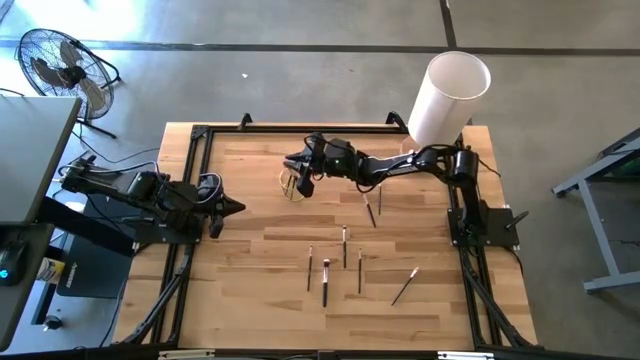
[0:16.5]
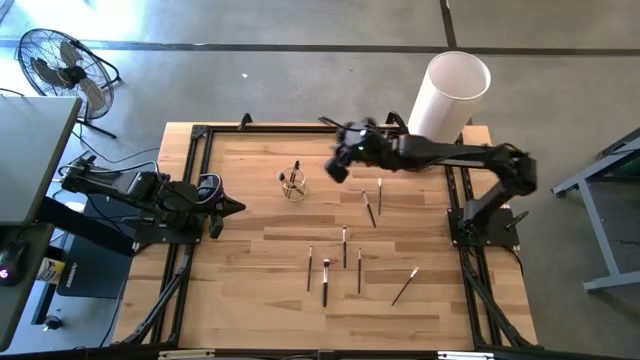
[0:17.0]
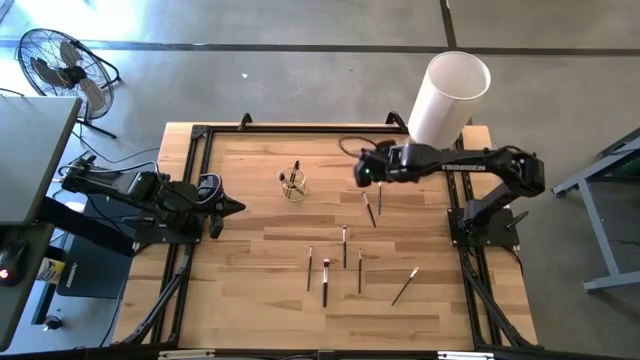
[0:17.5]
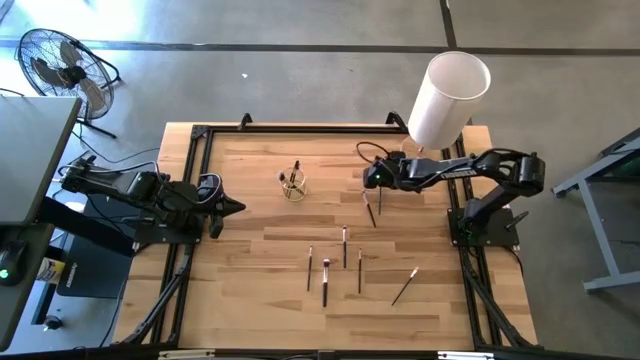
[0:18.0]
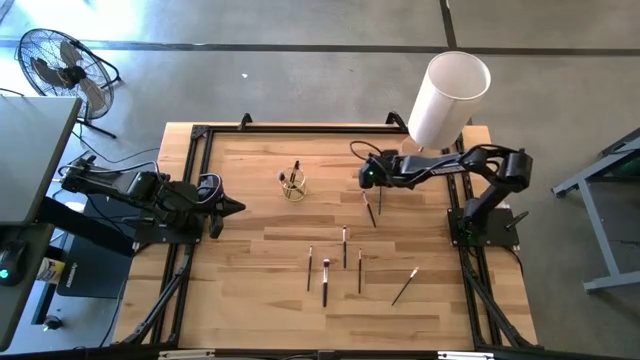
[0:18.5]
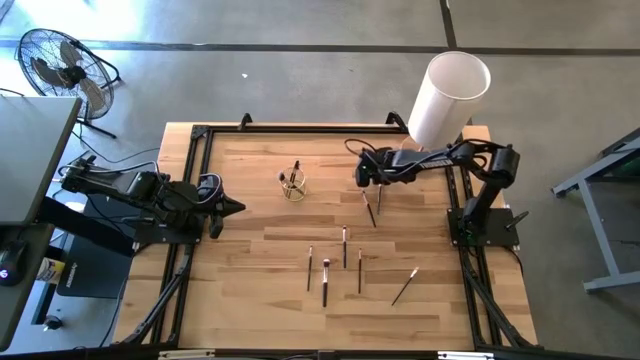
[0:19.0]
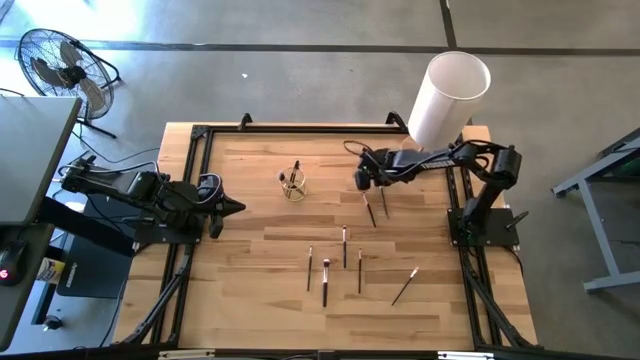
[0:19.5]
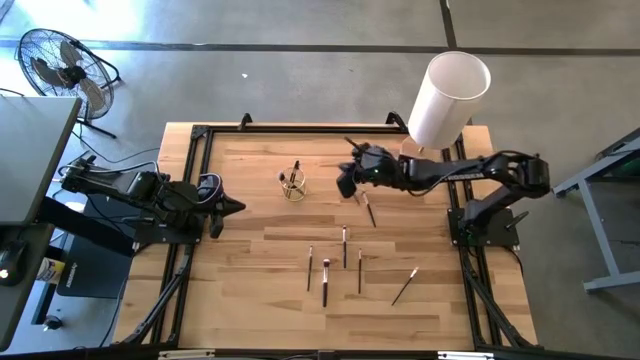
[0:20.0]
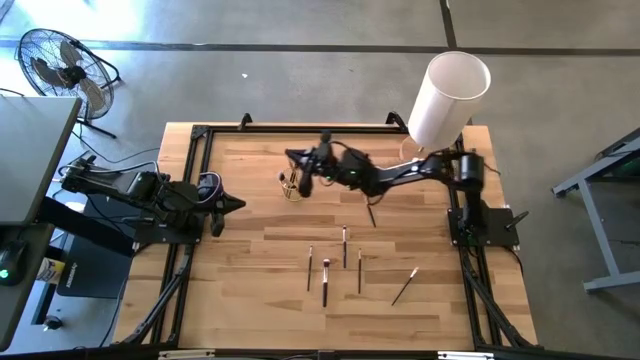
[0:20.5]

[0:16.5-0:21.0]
Task: Put items in baskets/containers
Put the makeup brush into the wire organizer

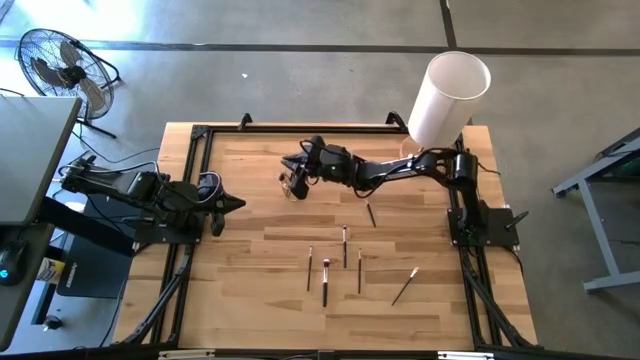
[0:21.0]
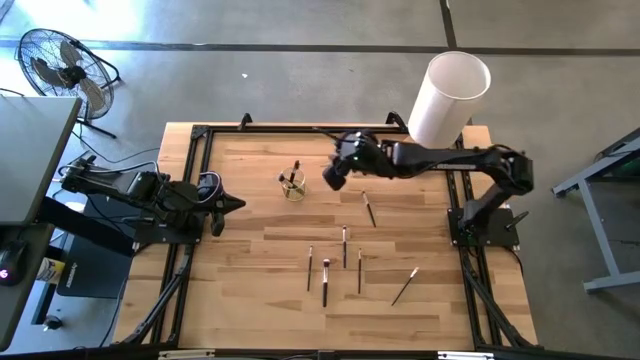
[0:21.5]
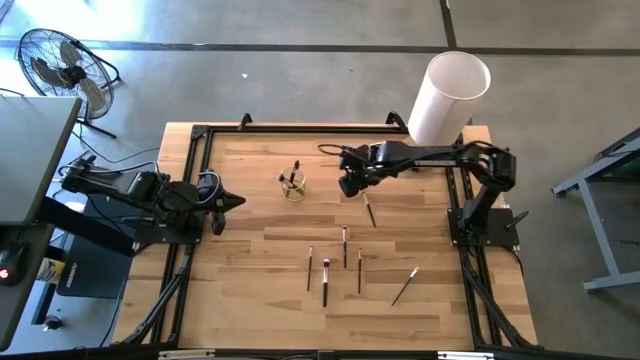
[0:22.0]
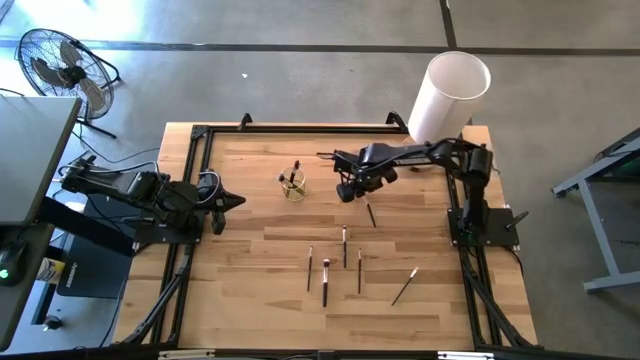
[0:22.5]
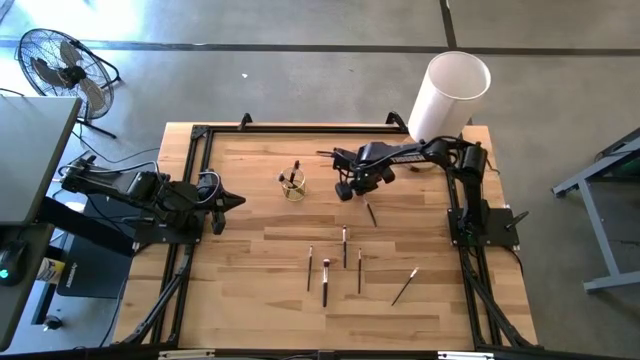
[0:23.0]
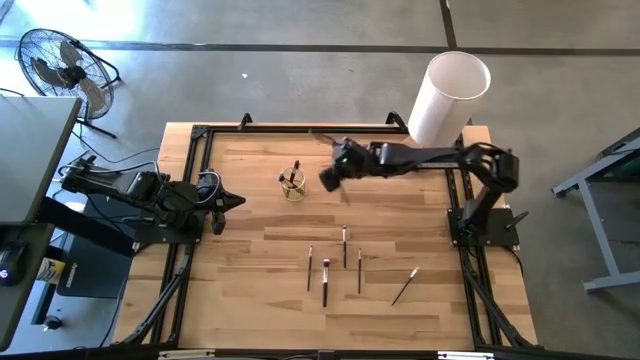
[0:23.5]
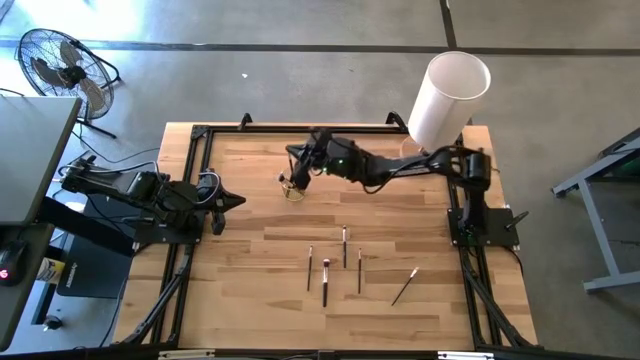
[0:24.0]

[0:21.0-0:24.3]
Put the makeup brush into the wire organizer

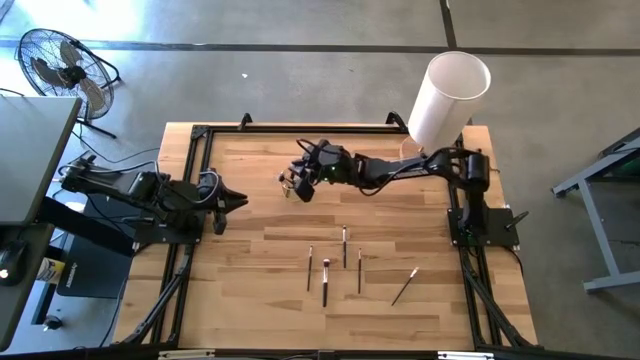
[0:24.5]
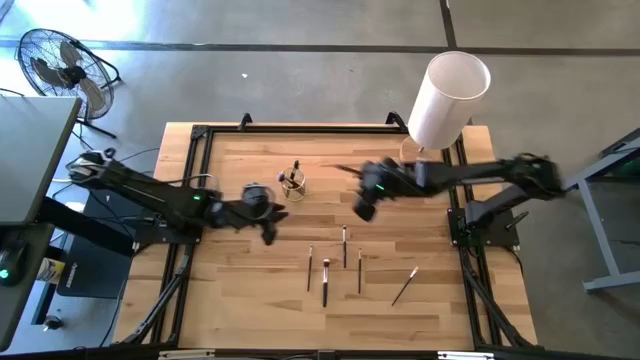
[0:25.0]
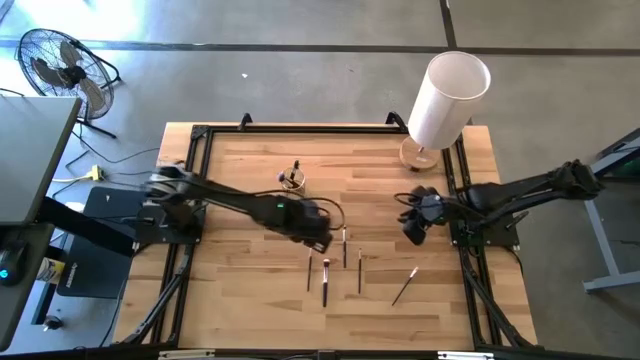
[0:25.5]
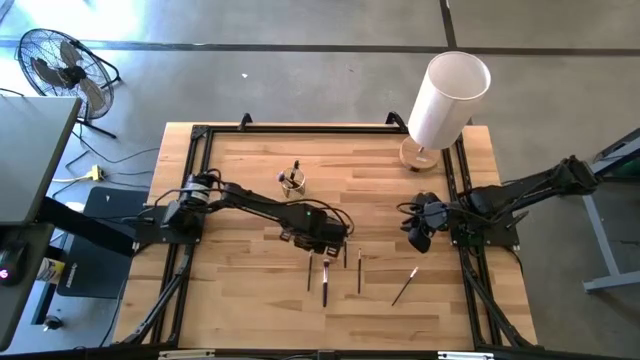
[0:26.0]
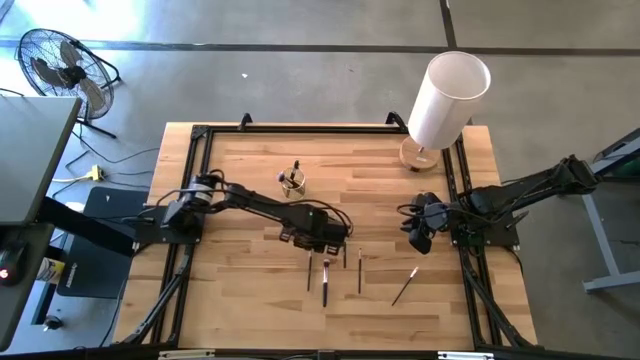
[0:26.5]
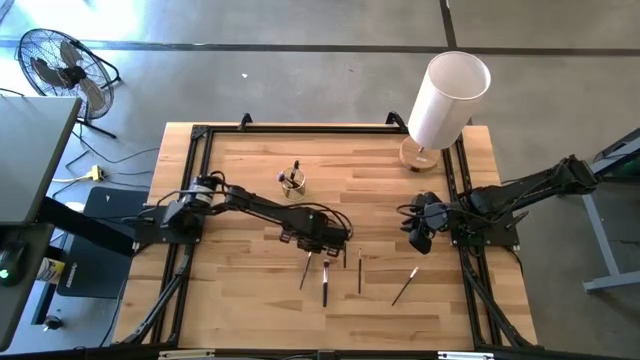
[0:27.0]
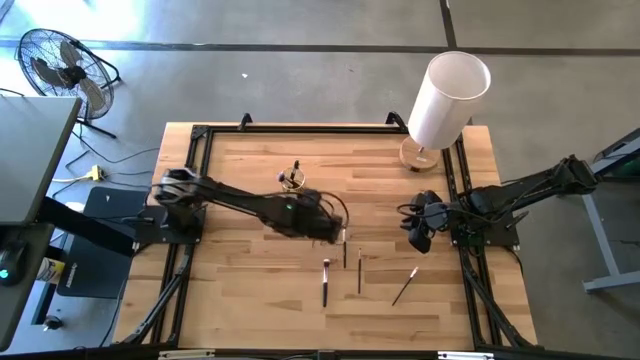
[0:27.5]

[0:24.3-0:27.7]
Put the makeup brush into the wire organizer

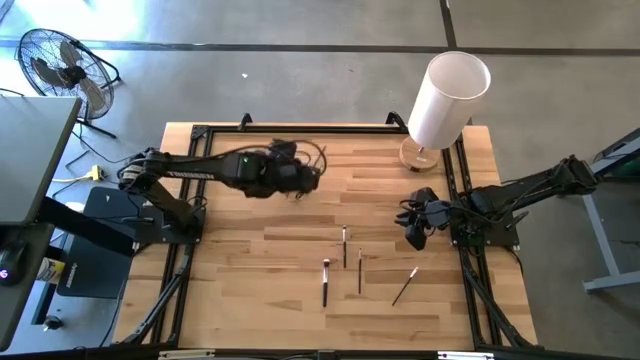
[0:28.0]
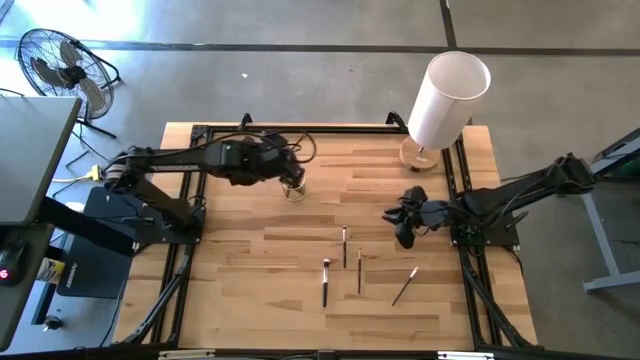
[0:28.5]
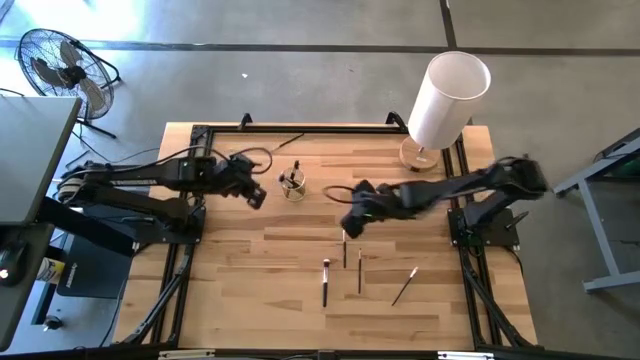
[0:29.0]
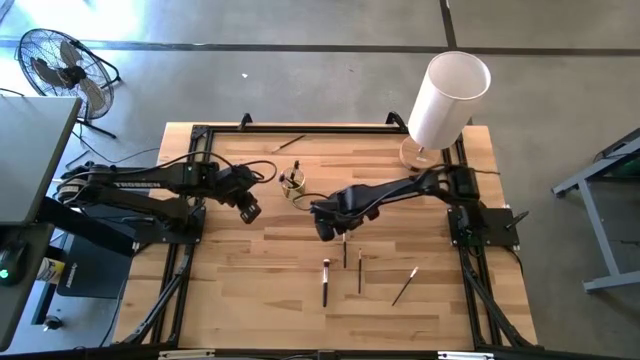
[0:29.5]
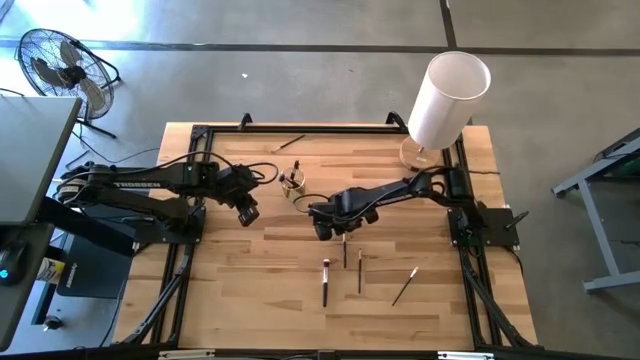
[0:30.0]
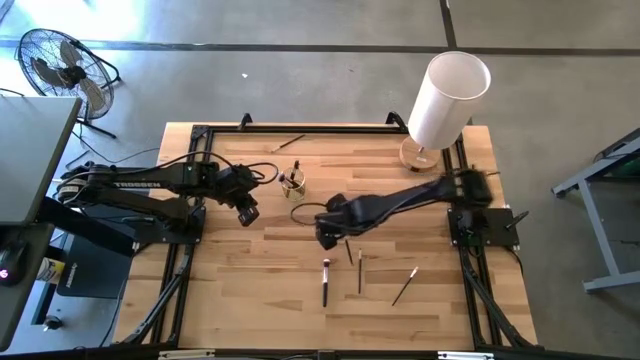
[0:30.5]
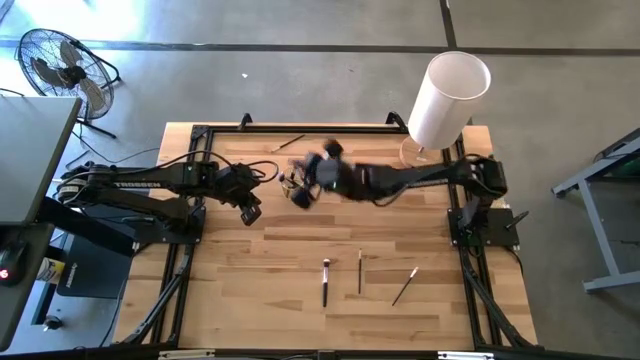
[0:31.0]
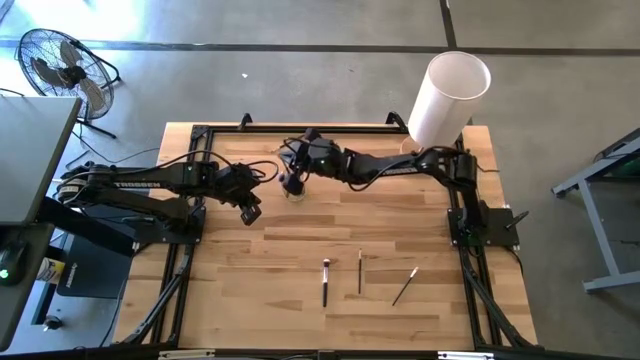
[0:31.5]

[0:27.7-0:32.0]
Put the makeup brush into the wire organizer

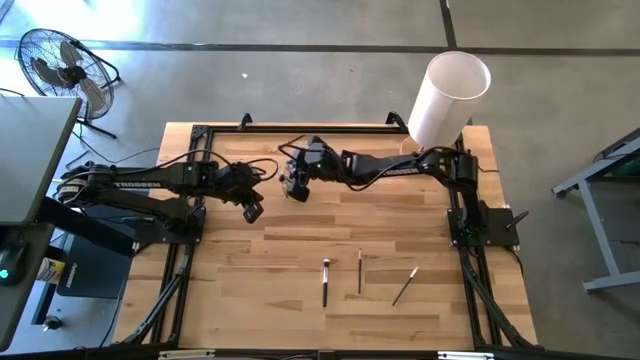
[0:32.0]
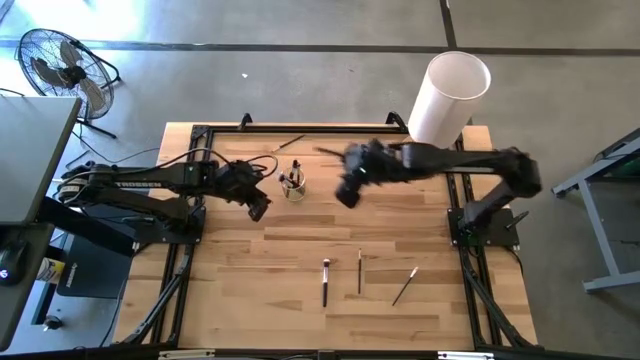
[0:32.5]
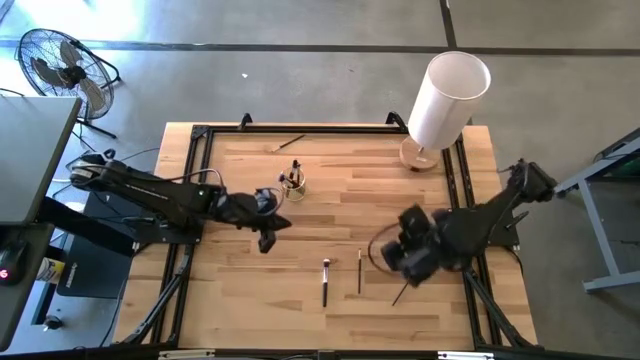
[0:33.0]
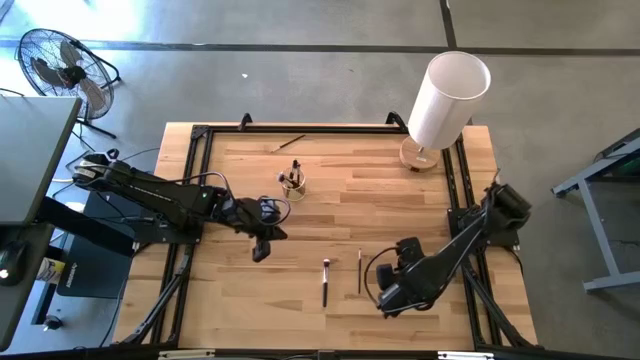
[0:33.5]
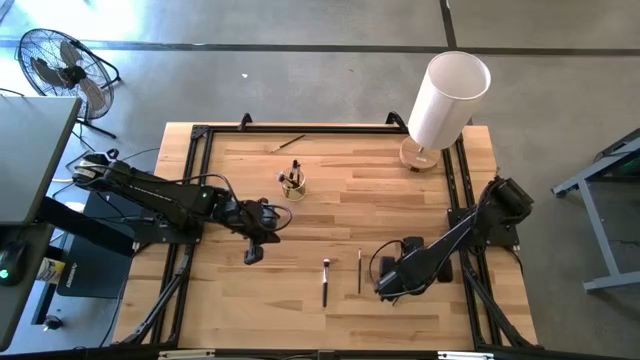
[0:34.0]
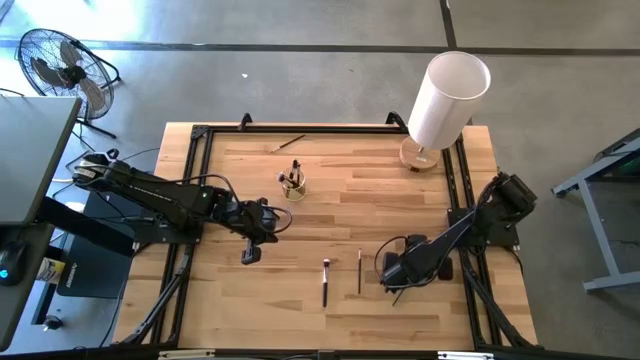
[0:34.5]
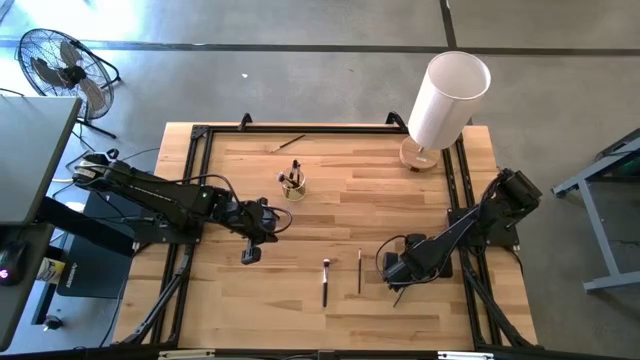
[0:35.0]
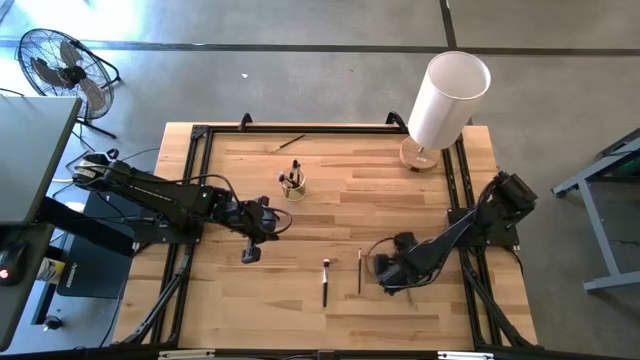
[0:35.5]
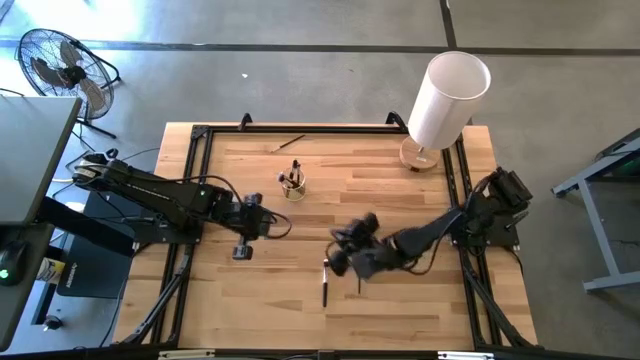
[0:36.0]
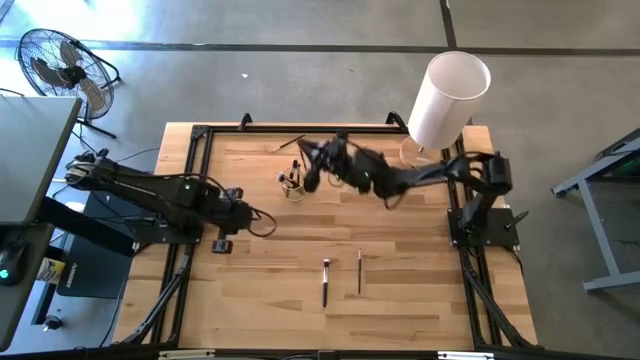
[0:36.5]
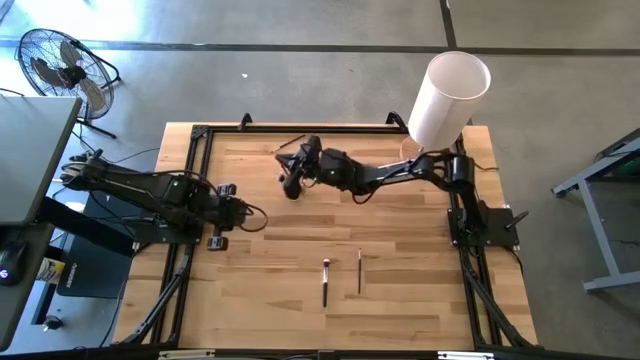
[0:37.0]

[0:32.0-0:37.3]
Put the makeup brush into the wire organizer
